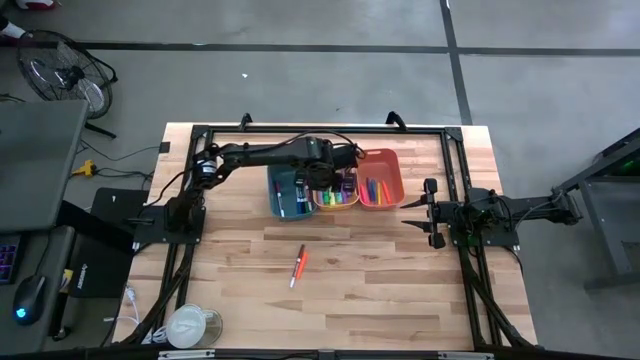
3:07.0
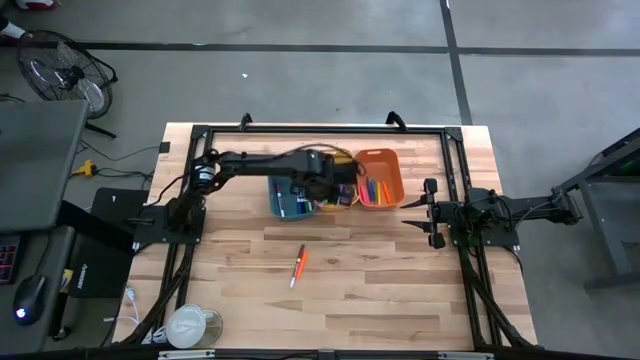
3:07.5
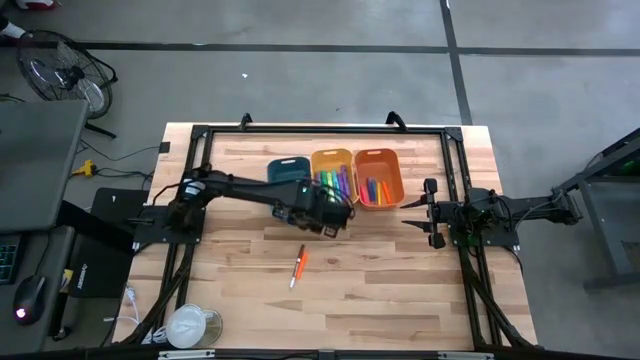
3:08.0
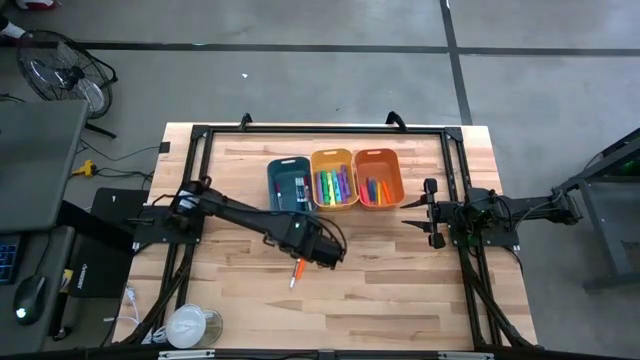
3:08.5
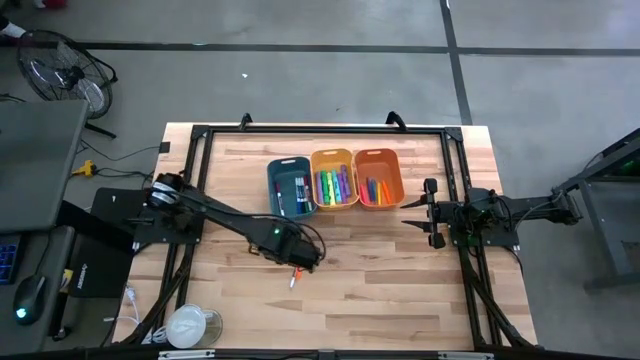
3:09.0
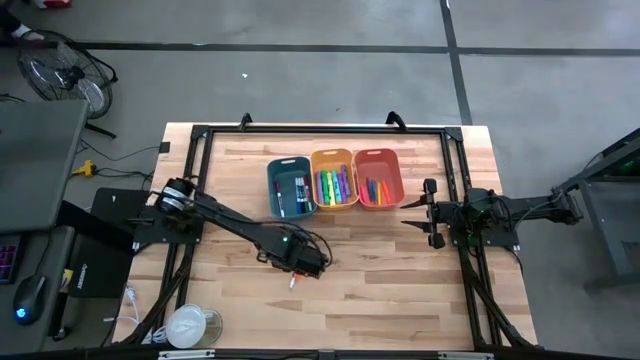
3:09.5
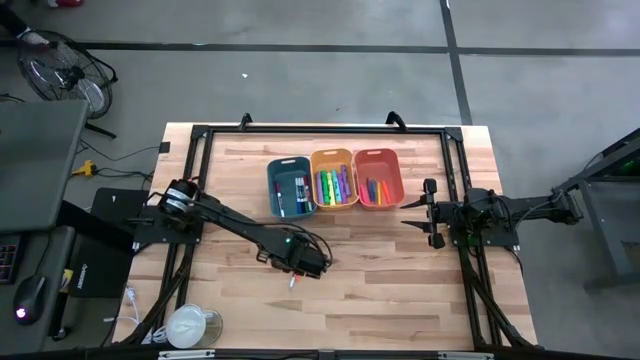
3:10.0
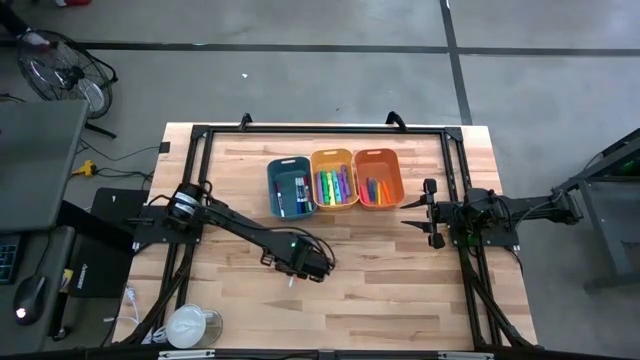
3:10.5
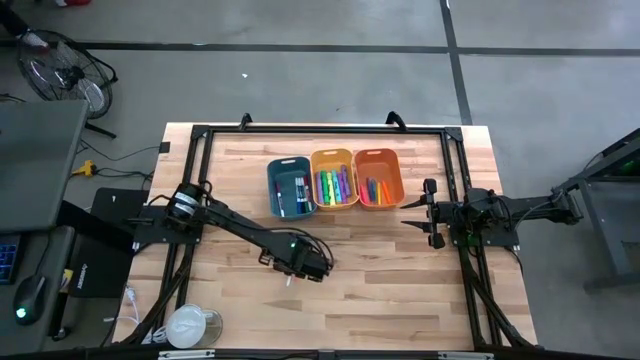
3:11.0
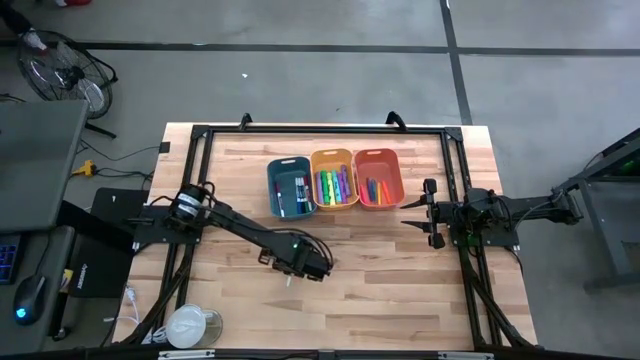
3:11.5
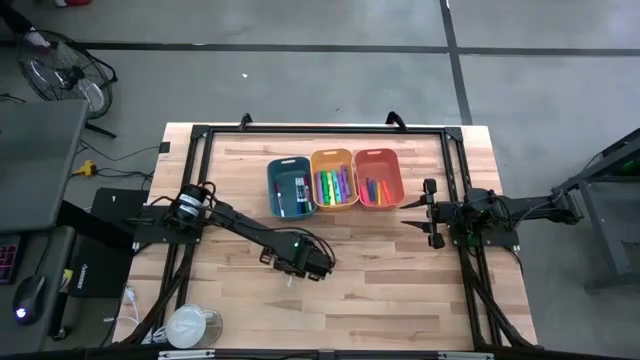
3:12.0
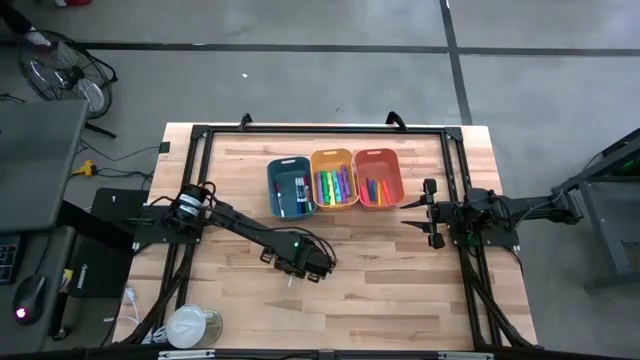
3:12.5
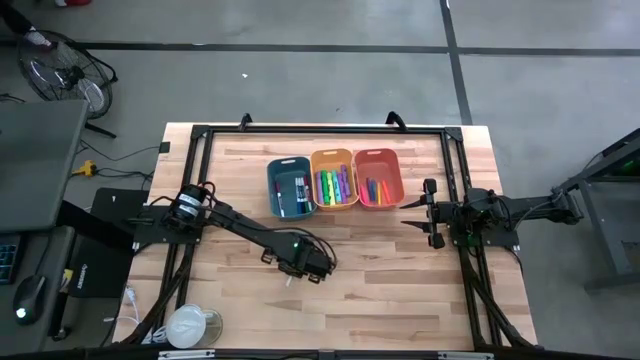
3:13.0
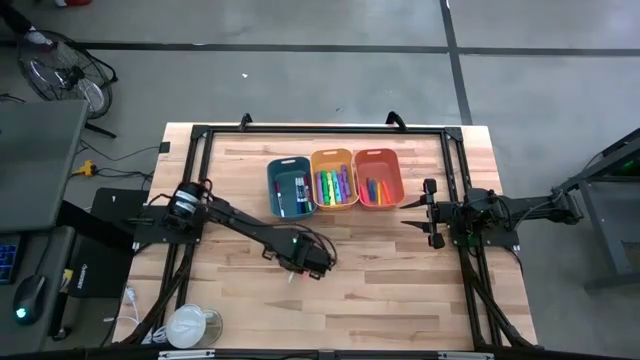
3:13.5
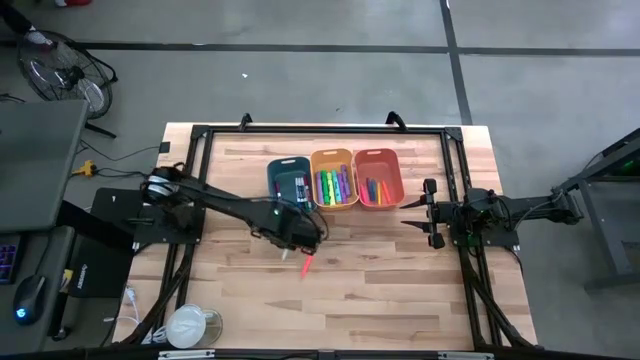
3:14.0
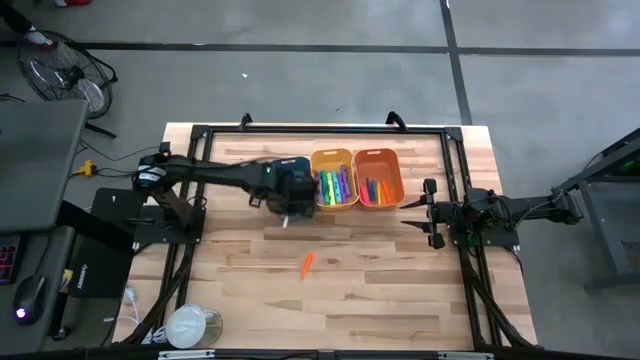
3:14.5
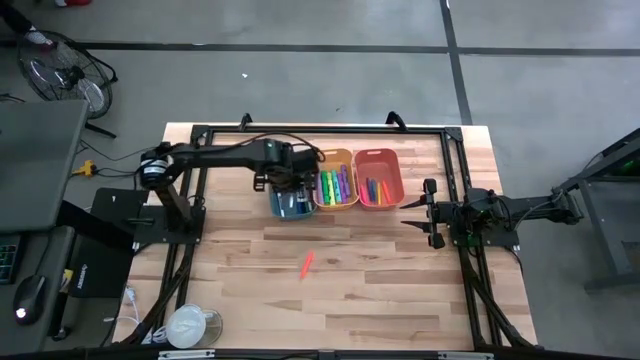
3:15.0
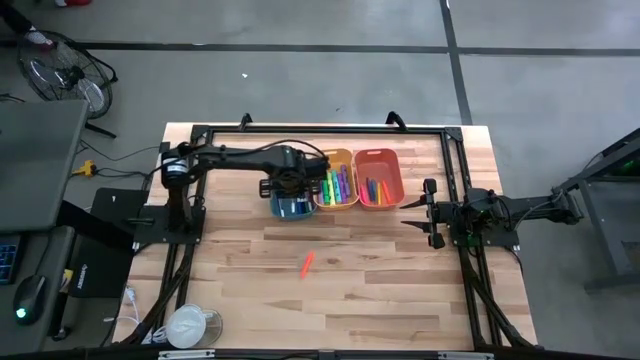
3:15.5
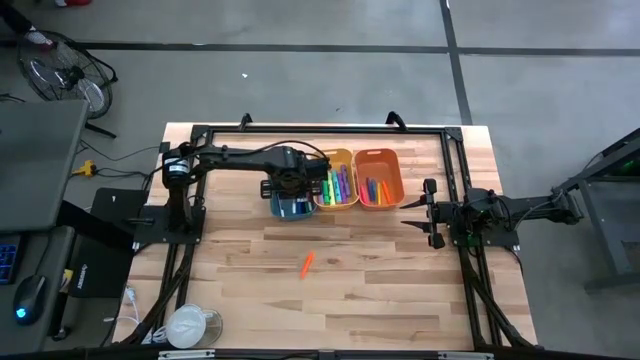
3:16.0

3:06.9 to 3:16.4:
Task: Pick & Place Markers
Put the brown marker pen into the blue bin

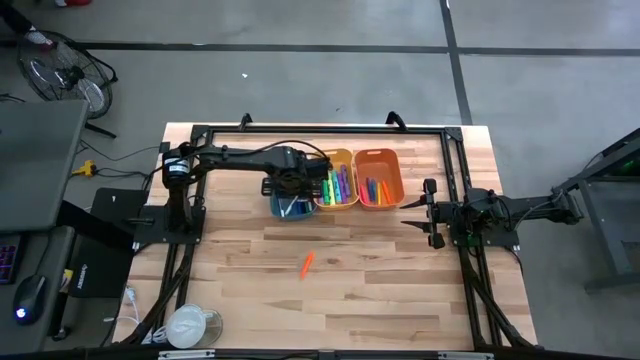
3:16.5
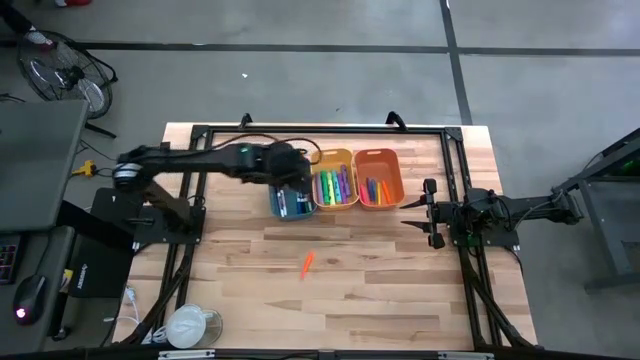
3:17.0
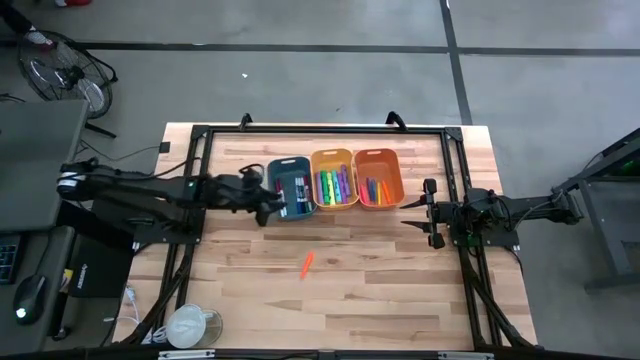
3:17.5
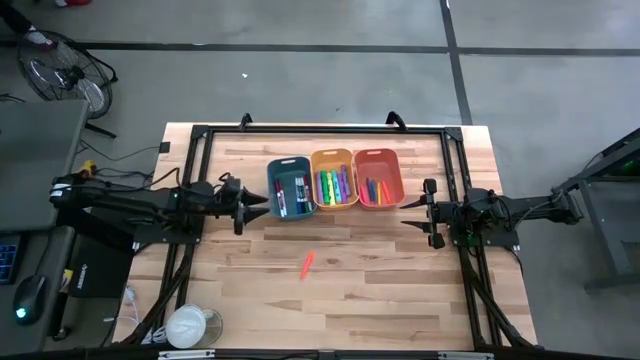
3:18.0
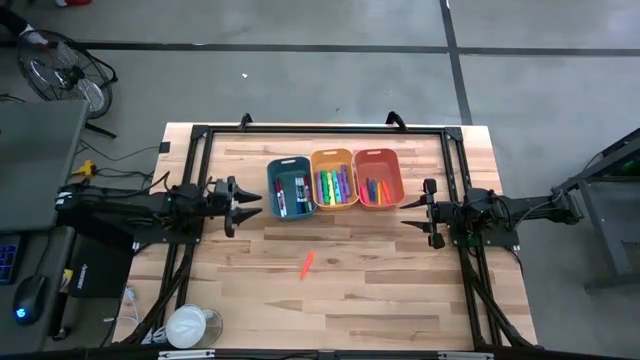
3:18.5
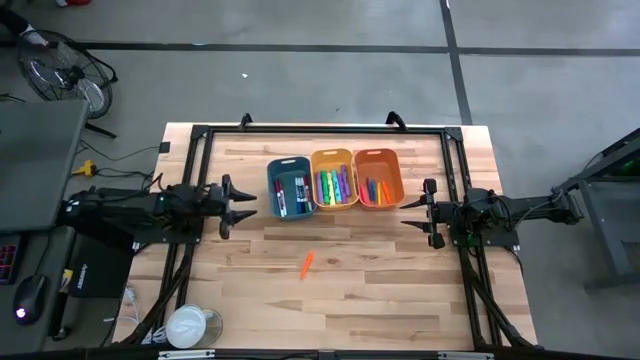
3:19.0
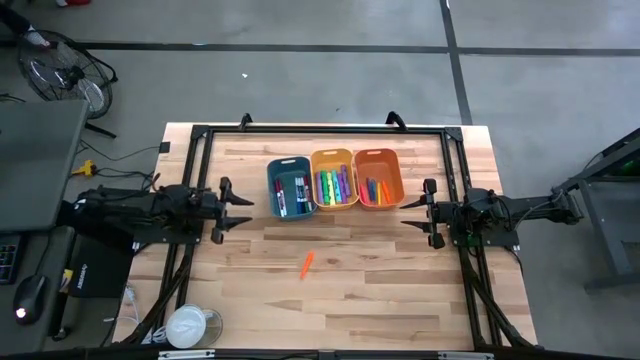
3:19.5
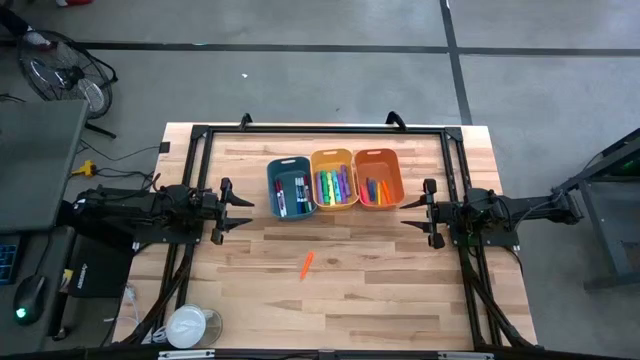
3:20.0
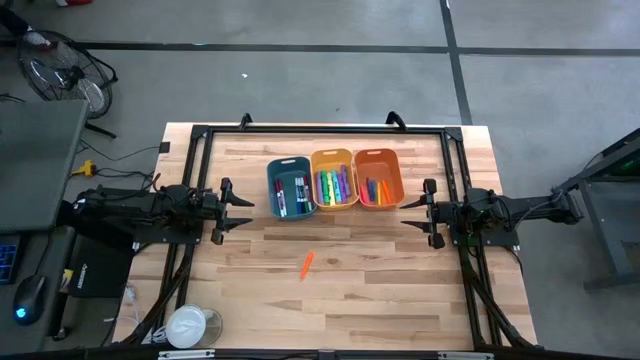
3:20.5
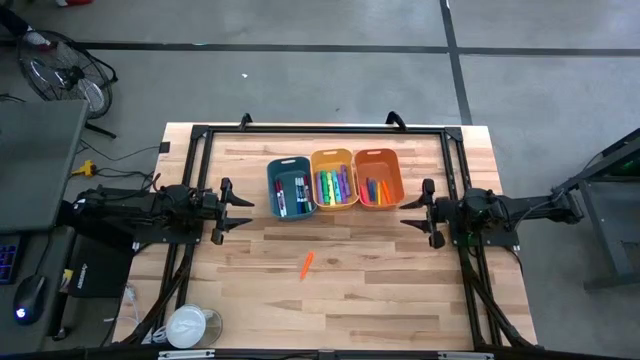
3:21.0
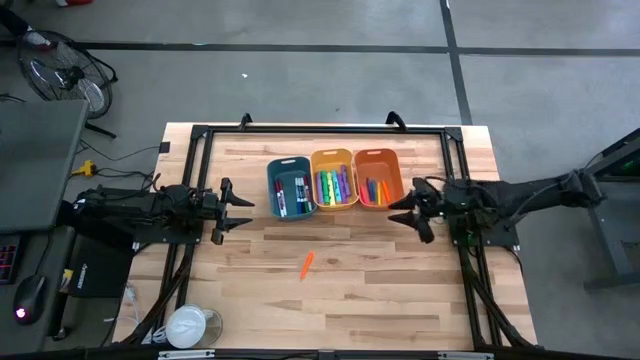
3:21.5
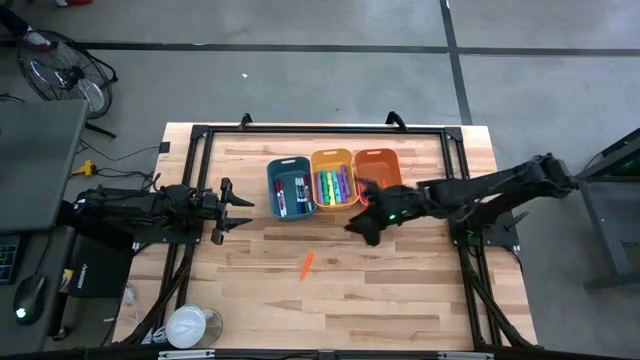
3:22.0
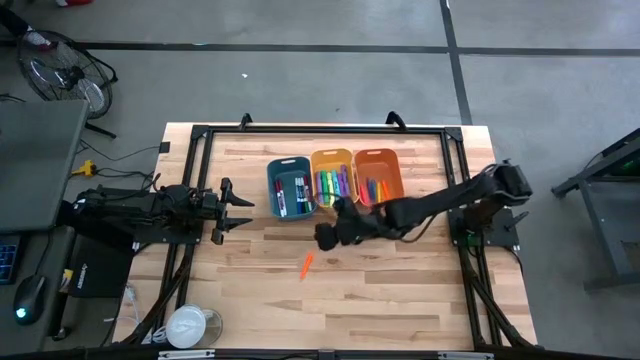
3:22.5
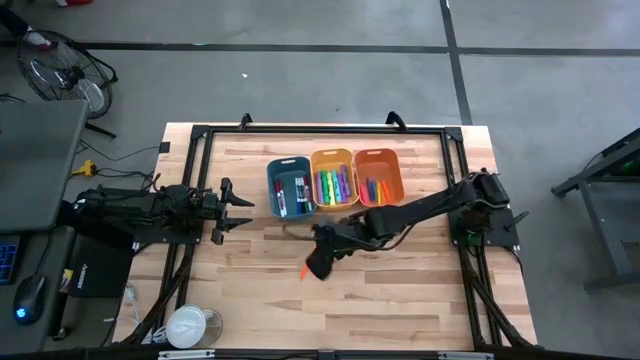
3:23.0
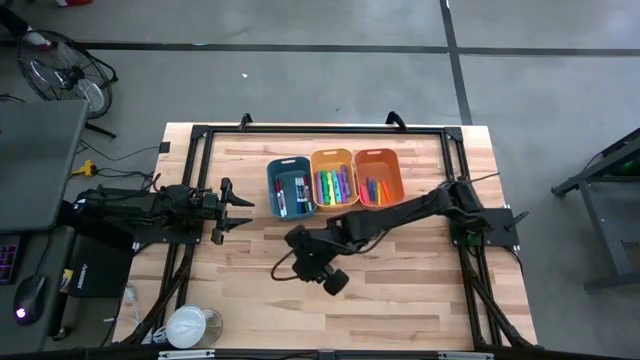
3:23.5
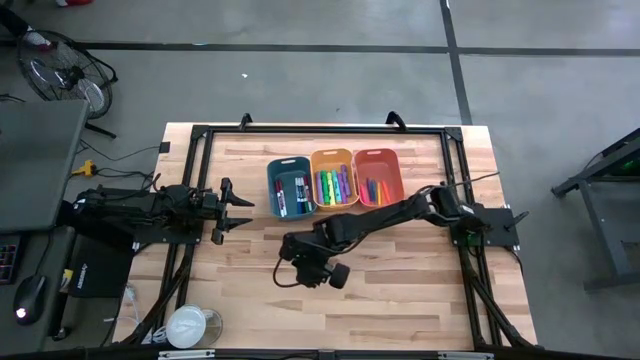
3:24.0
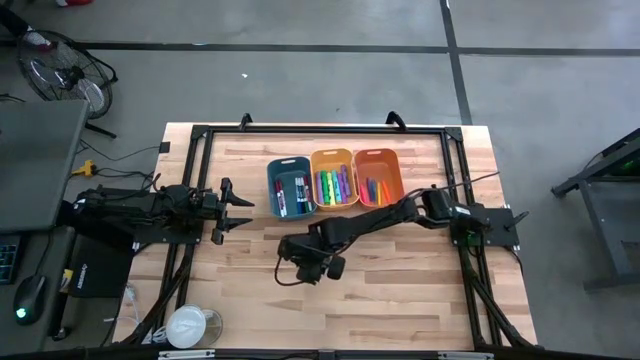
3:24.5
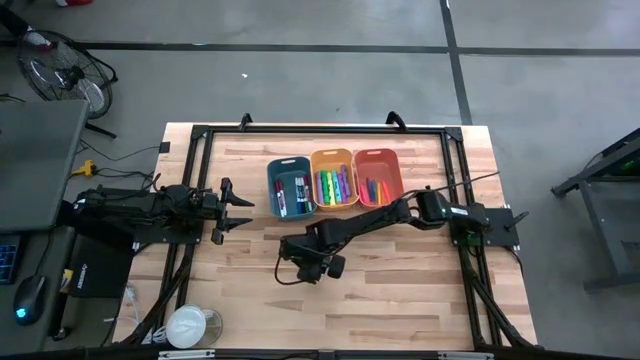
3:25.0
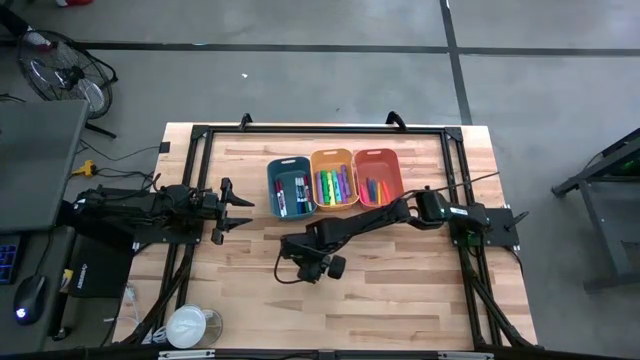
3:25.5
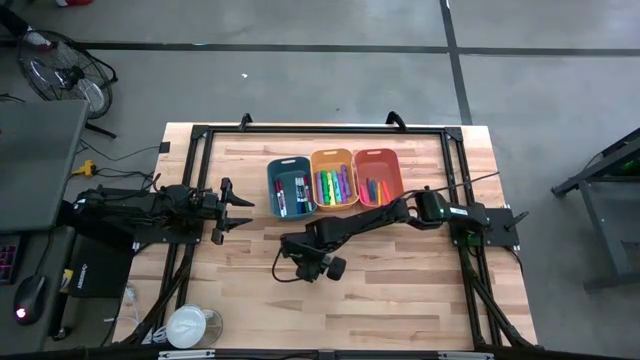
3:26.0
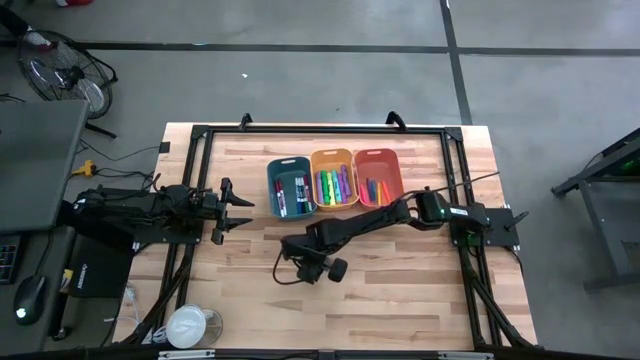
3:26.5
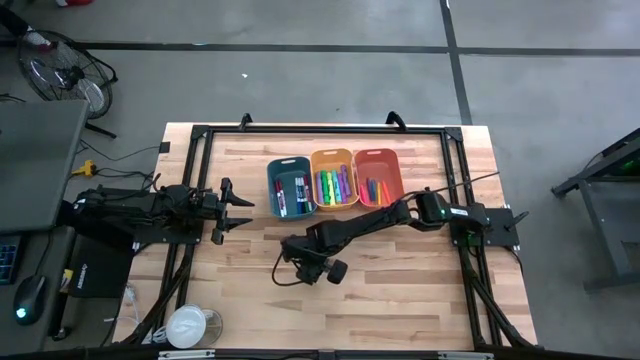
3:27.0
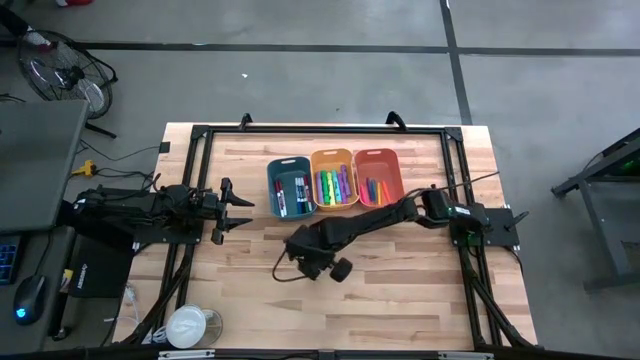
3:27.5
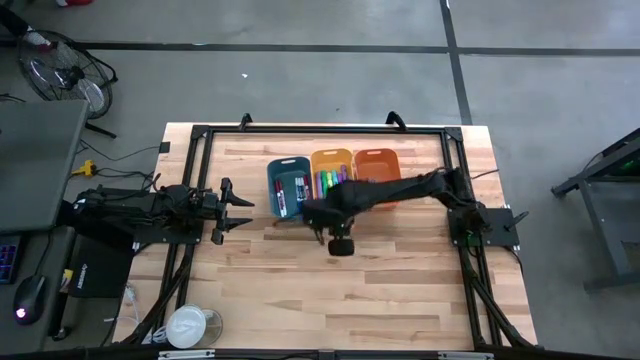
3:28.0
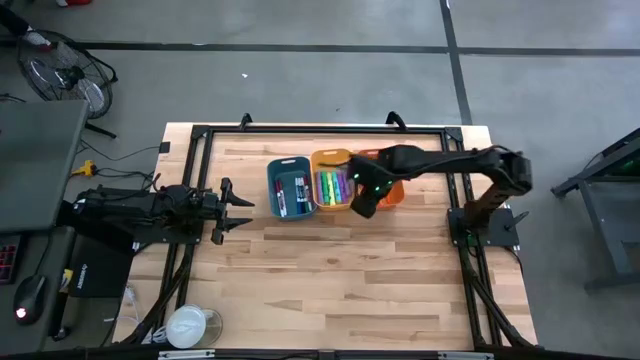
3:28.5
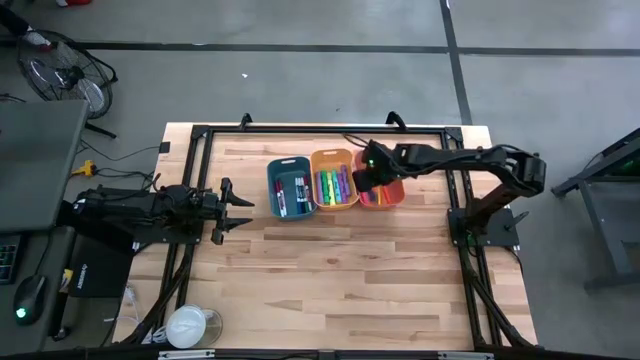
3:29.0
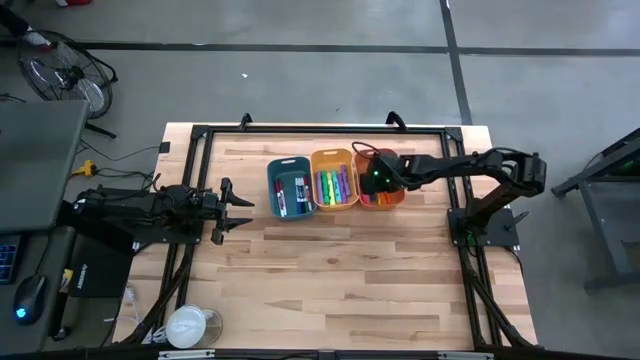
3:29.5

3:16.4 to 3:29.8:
Put the orange pen into the orange bin
